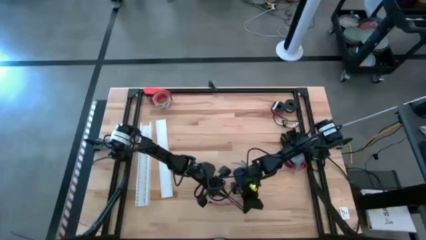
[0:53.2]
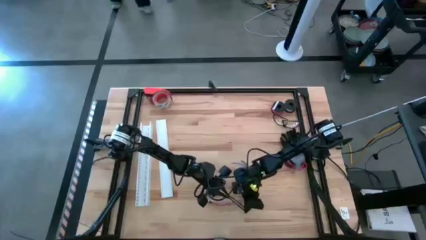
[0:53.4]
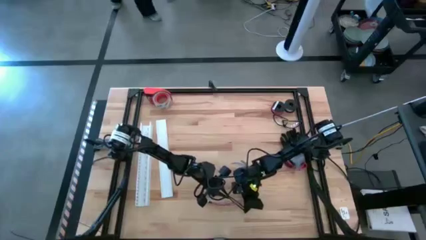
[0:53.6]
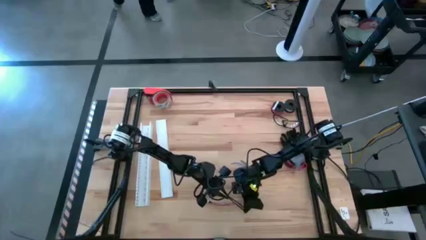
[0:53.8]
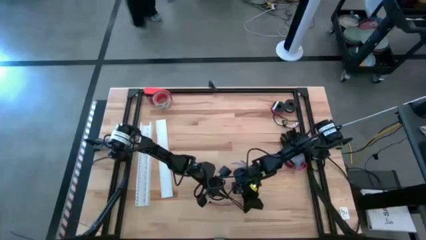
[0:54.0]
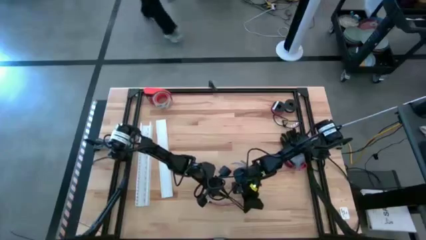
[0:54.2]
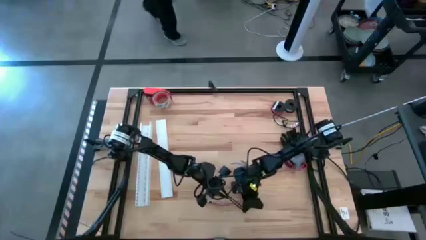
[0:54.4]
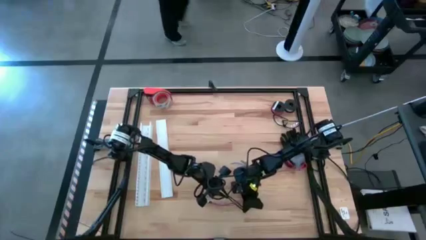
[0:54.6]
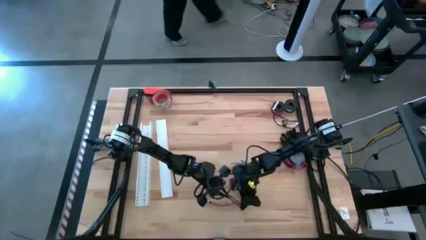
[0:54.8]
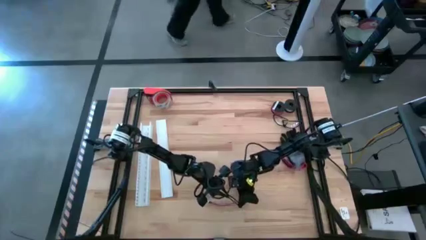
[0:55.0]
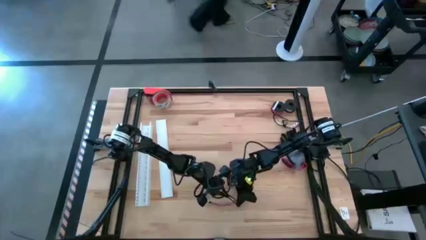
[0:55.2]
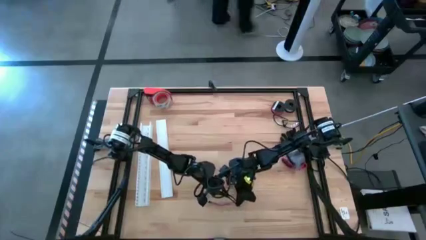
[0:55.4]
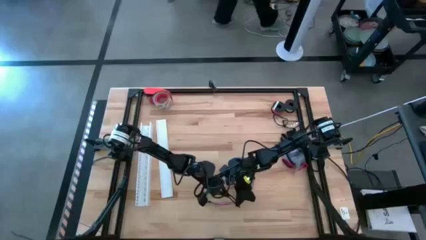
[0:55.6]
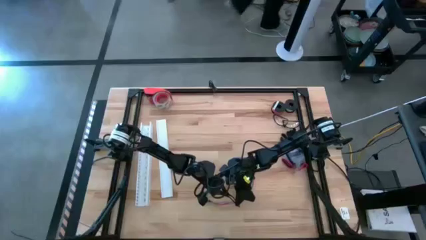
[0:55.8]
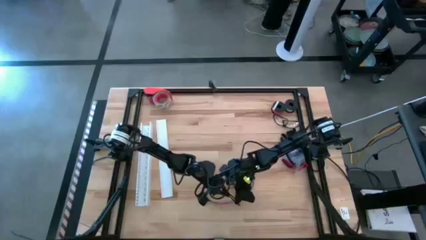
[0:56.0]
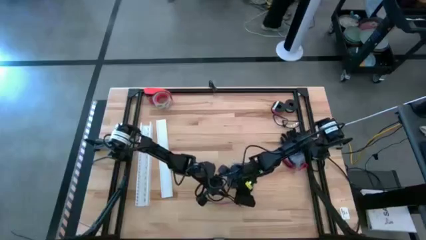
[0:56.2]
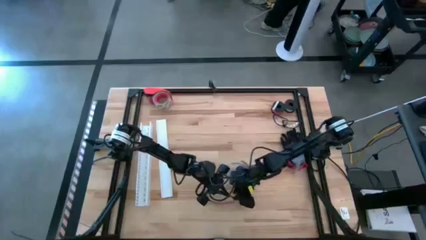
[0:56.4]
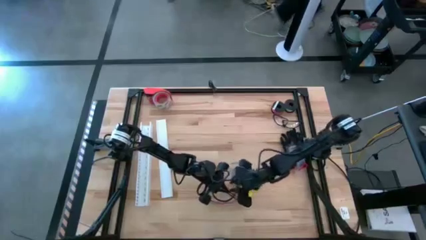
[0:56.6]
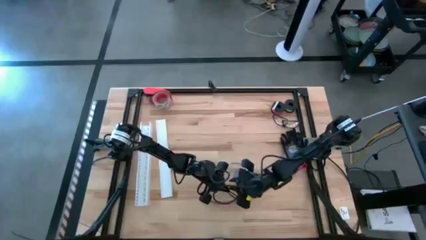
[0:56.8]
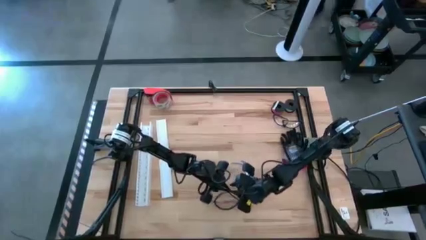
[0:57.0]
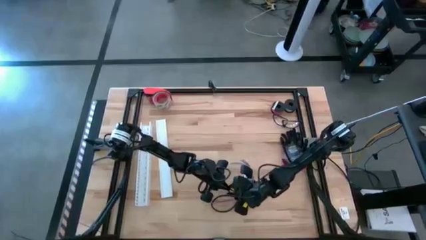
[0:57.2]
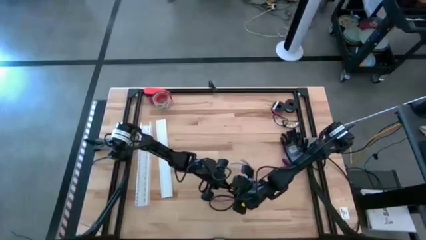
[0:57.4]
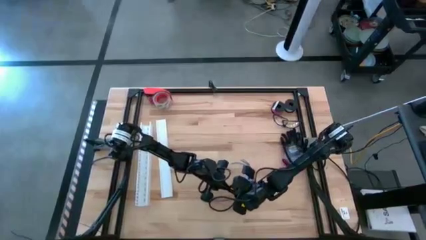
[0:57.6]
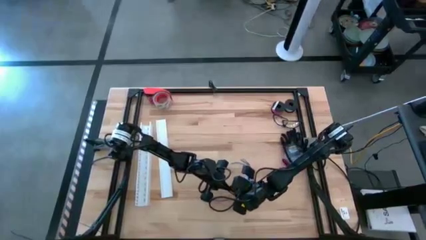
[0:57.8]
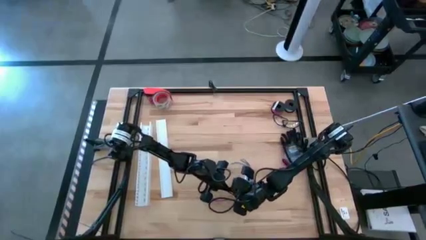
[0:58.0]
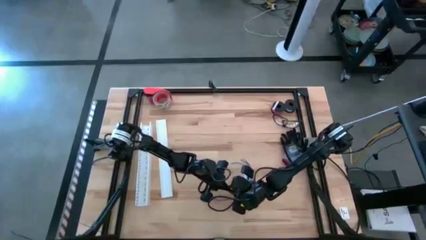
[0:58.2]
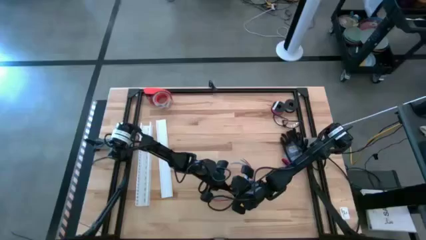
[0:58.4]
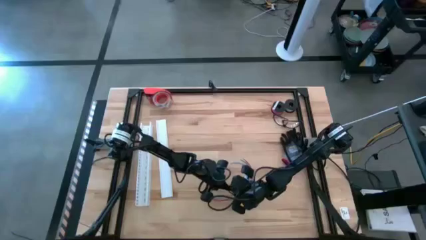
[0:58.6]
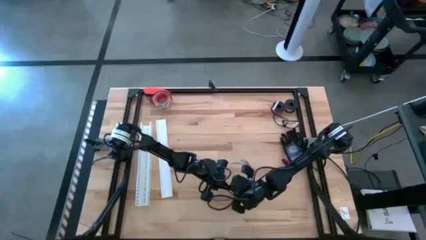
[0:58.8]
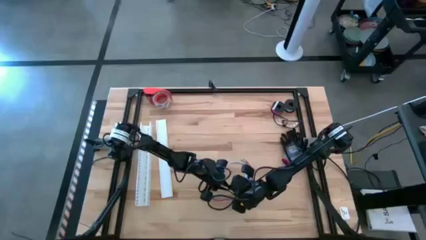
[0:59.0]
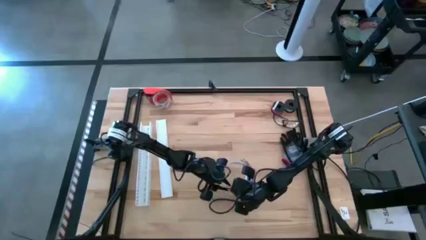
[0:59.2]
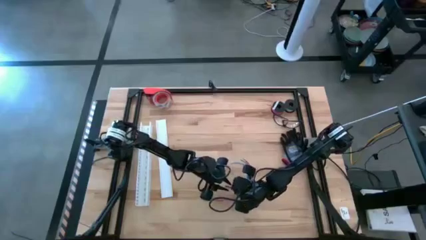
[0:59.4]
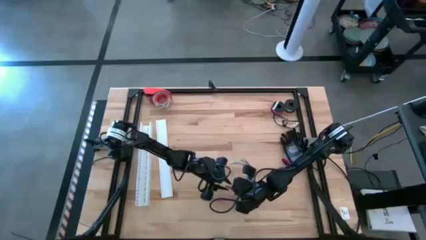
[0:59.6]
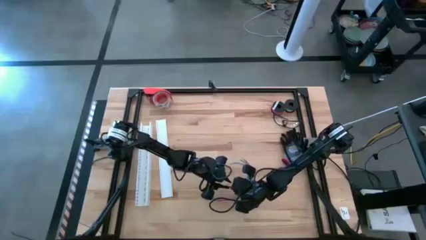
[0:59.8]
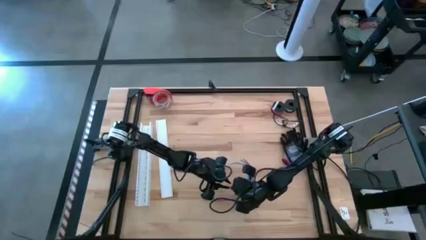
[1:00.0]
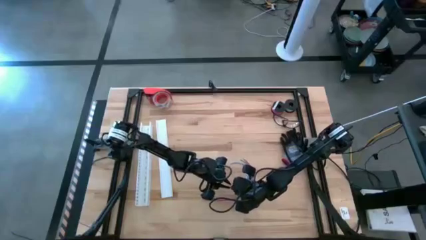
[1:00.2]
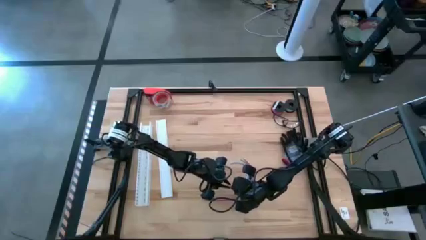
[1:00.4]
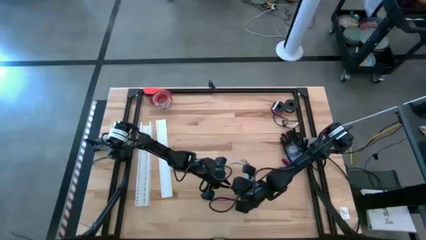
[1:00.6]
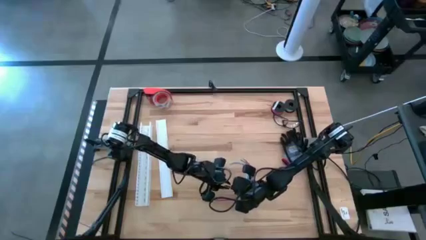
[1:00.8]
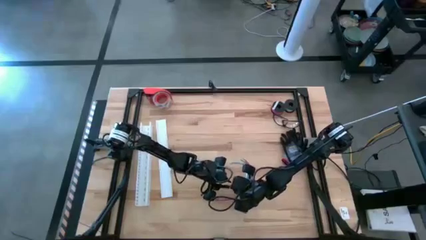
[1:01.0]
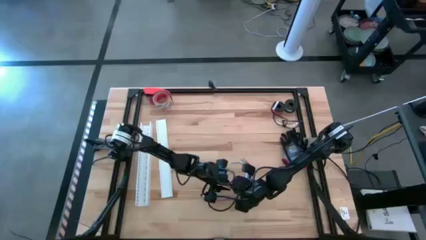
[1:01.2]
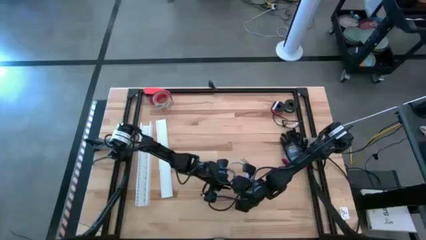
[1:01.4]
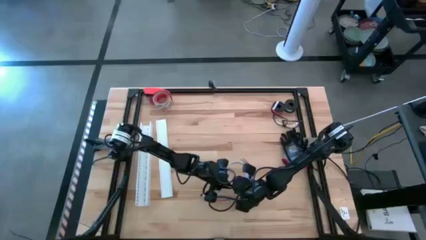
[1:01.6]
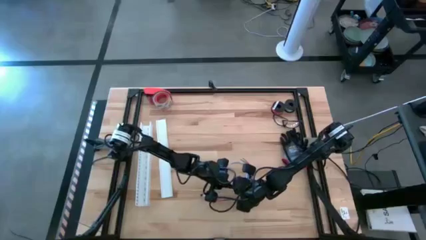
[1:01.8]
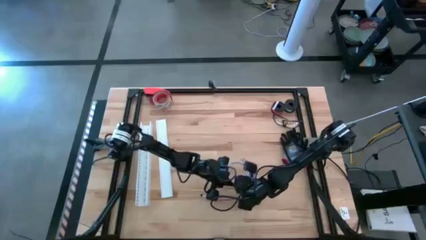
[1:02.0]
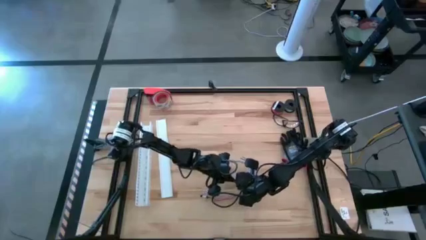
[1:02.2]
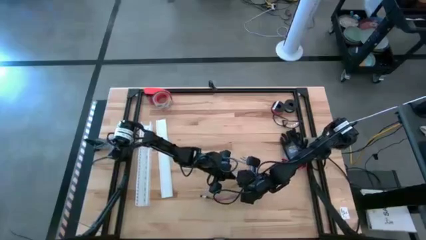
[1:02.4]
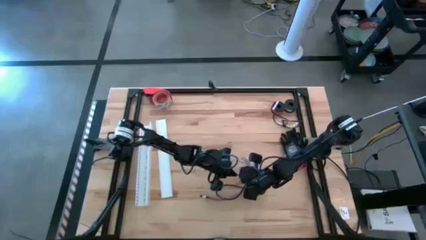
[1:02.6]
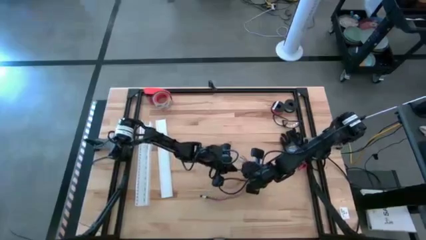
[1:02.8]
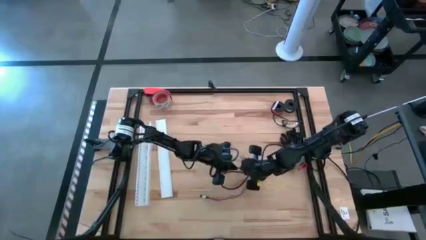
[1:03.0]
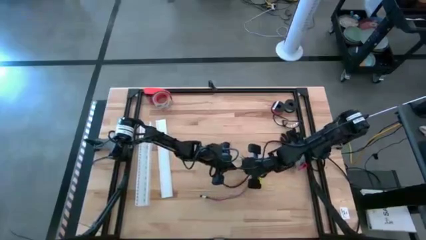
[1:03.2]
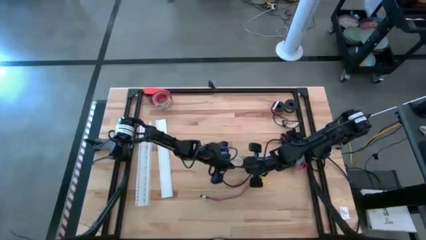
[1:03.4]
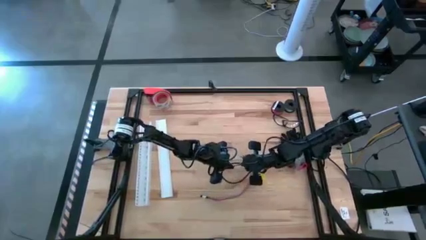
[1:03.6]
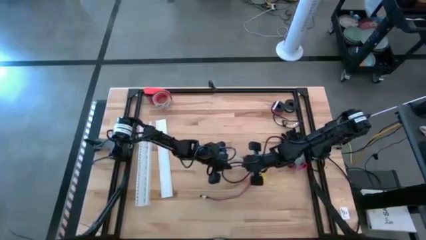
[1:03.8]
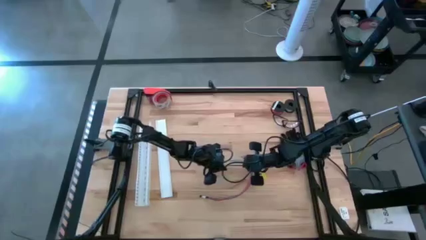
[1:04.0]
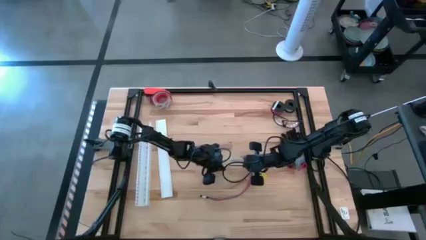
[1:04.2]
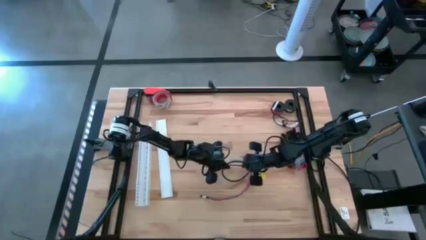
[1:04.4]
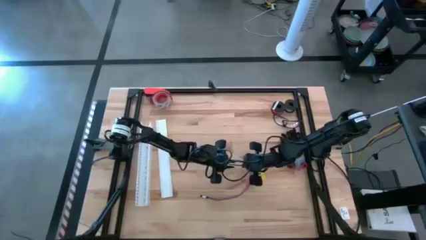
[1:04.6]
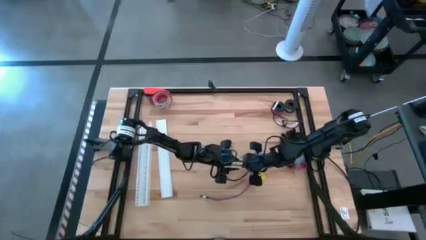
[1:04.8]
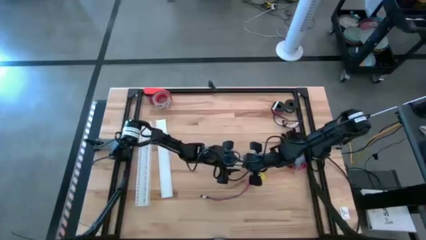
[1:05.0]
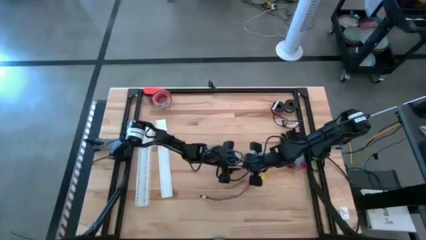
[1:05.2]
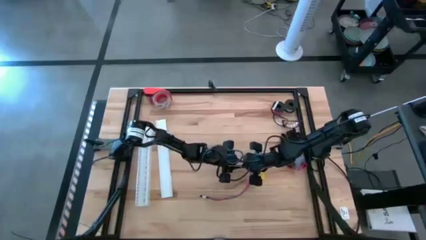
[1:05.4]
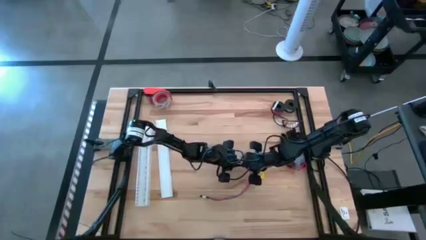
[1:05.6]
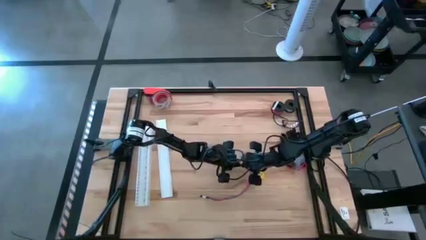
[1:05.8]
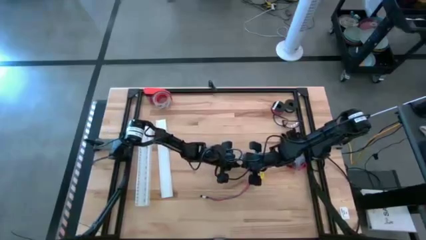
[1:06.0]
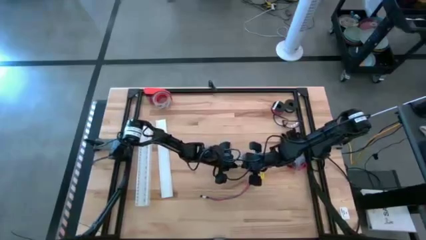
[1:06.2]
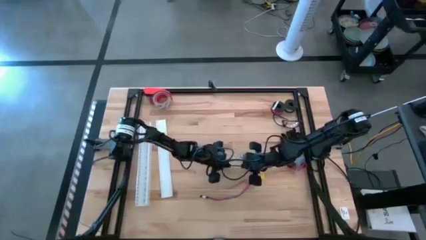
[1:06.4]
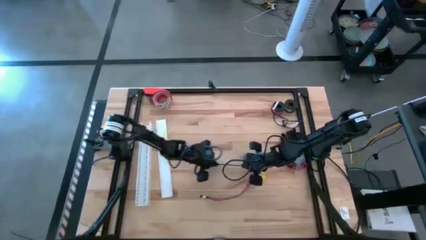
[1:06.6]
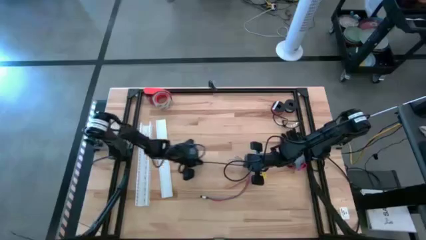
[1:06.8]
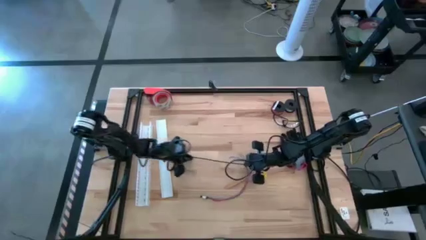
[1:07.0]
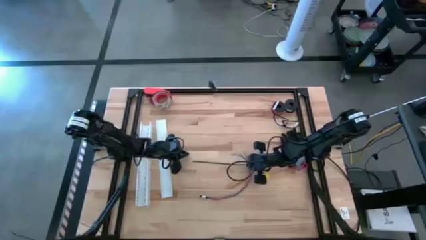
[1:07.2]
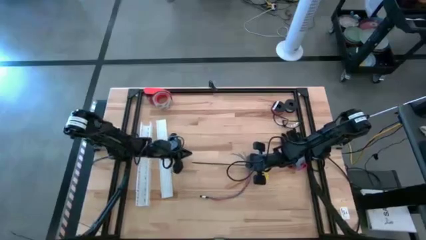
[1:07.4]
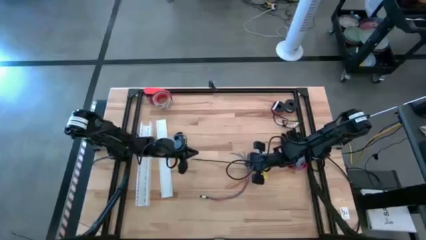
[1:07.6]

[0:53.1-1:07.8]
Task: Ziptie cables
Wrap the black zip tie around the cables

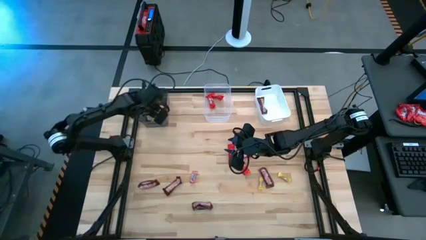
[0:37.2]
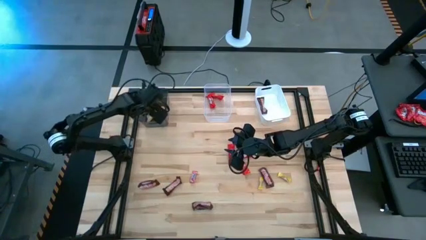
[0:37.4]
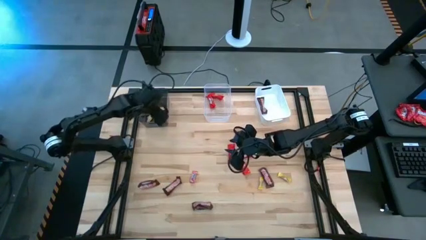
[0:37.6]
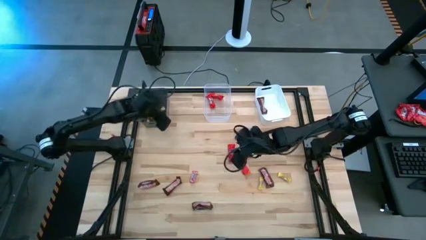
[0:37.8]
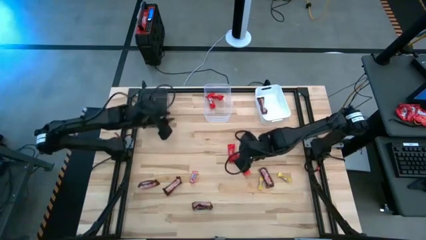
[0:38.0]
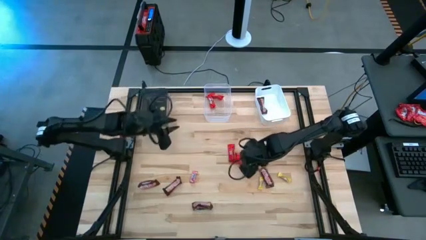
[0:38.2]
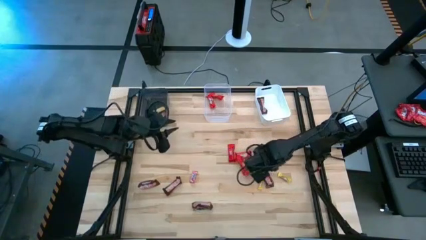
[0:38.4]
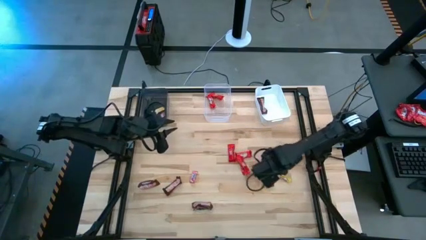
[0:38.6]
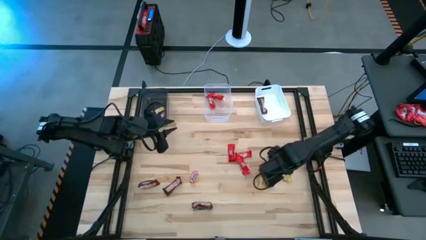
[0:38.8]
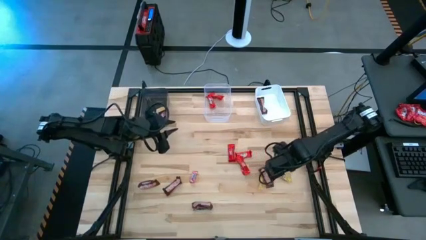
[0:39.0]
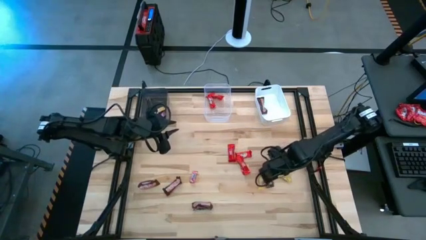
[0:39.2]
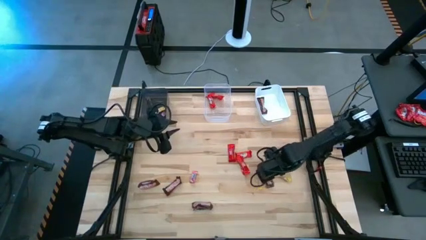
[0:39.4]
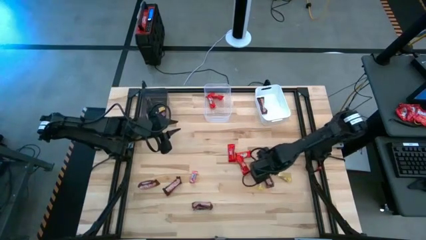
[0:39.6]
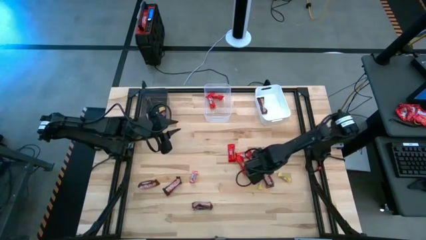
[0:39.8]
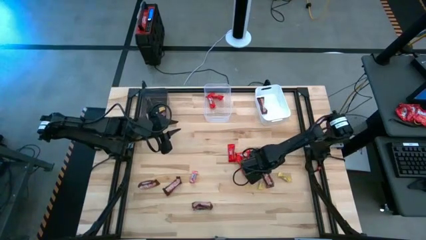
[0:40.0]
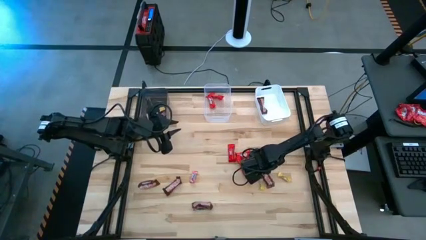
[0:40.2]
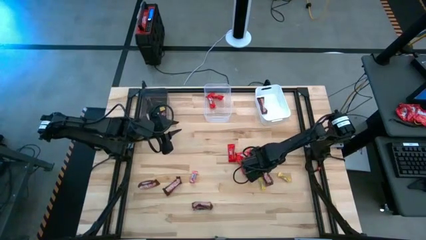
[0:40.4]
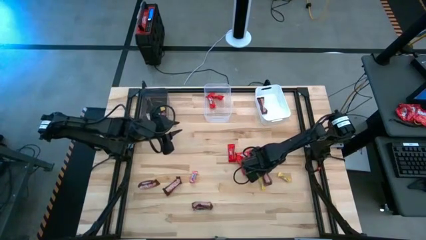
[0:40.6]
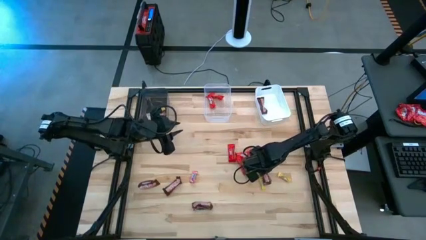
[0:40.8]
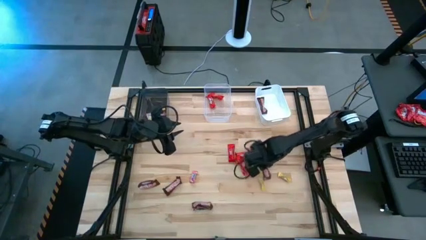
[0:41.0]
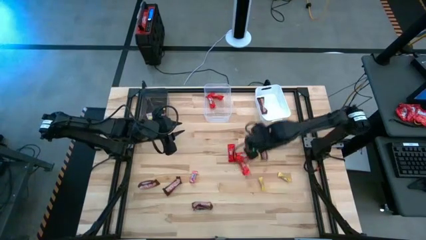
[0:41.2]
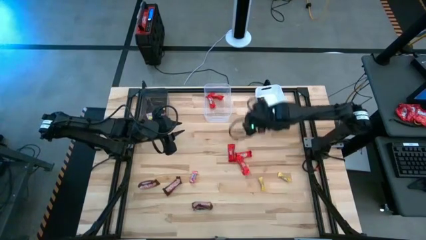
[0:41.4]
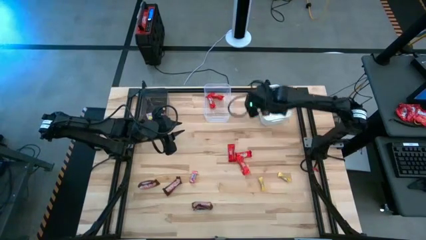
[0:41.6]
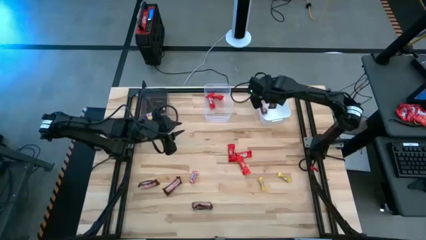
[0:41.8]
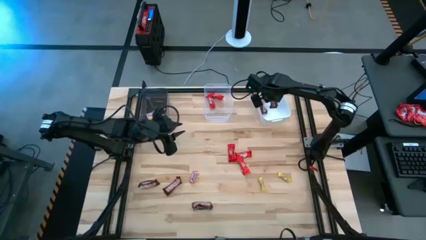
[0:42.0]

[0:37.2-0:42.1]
Task: Sort candy by brand, put in halloween buckets
Put the brown chocolate bar into the white bin
